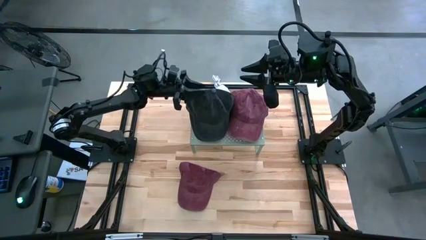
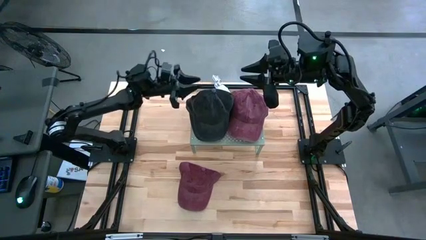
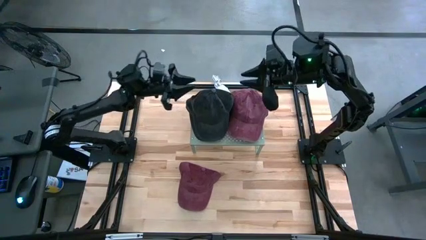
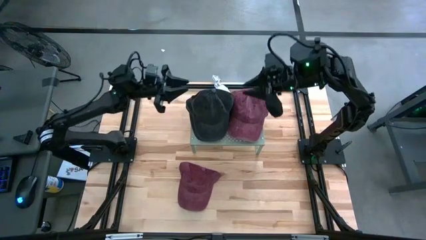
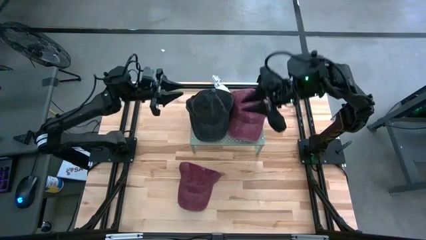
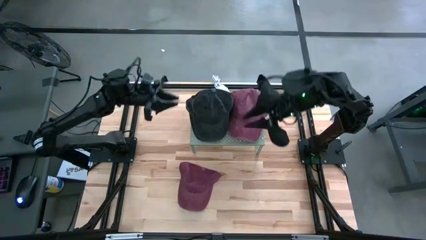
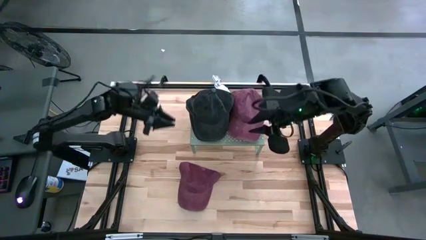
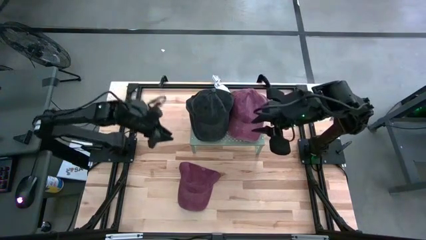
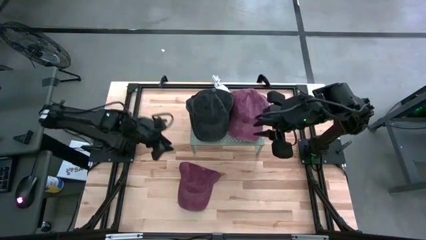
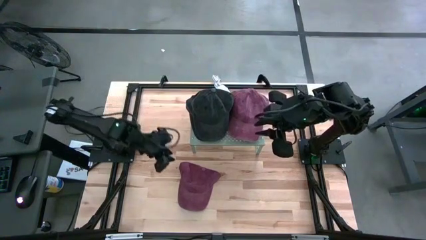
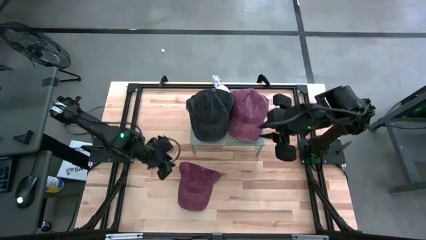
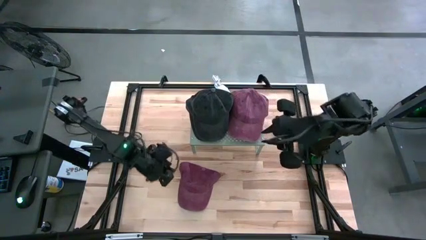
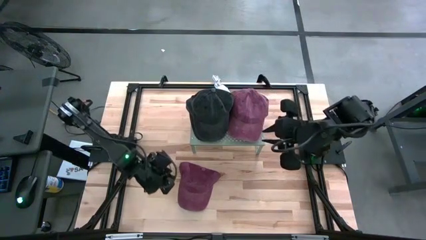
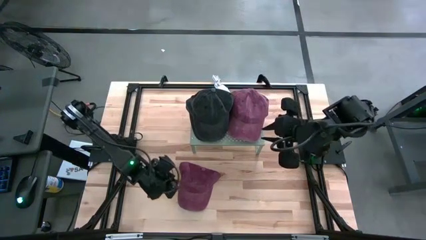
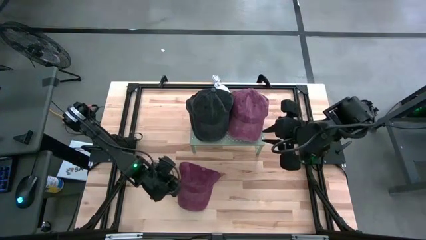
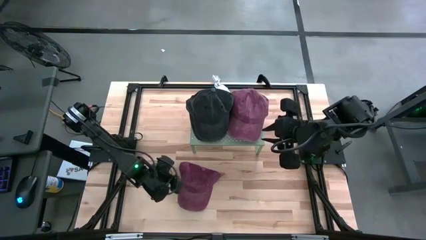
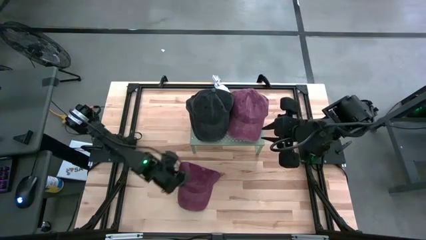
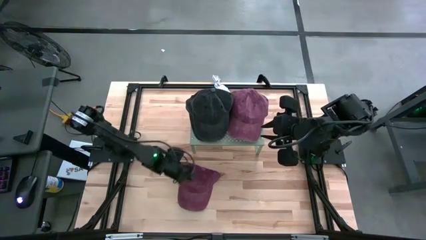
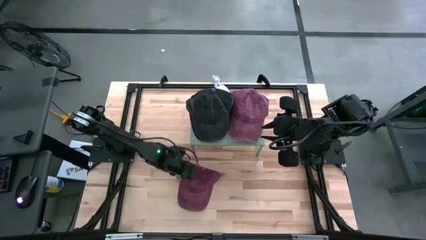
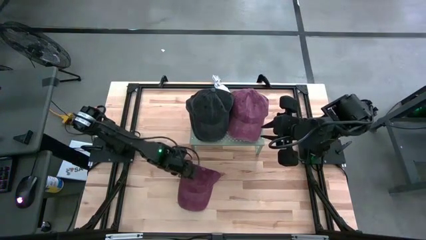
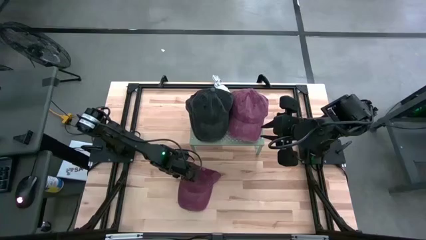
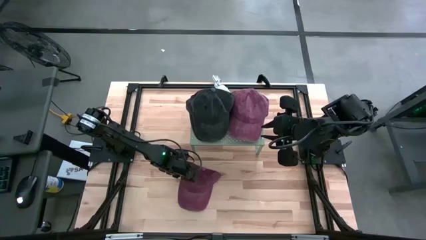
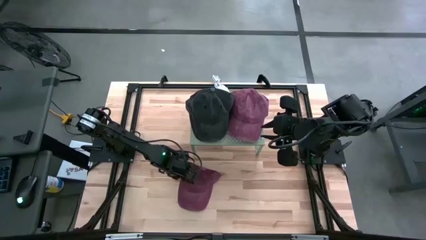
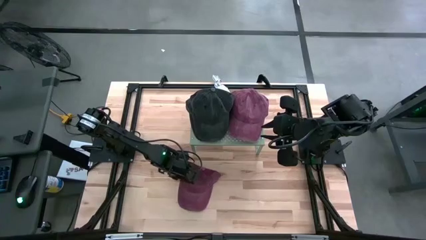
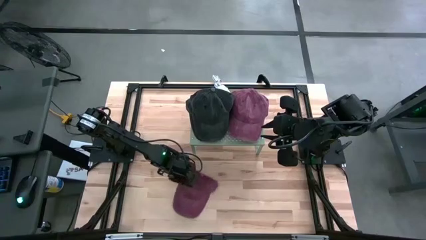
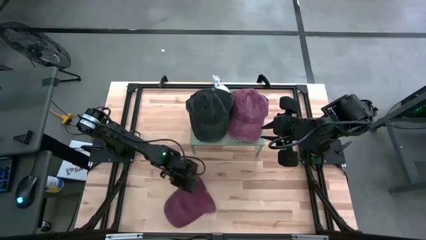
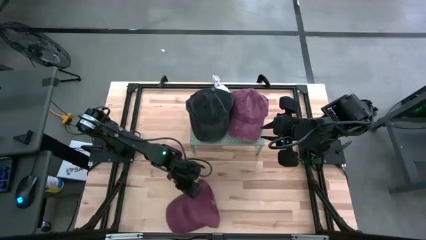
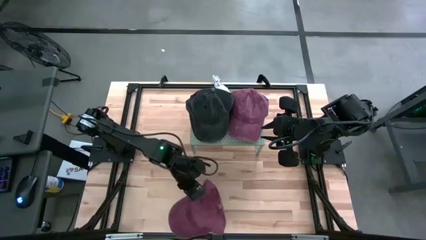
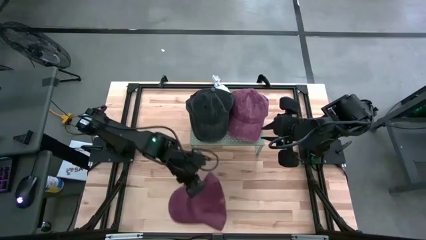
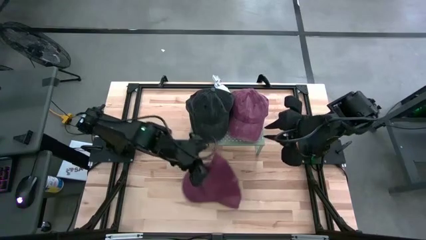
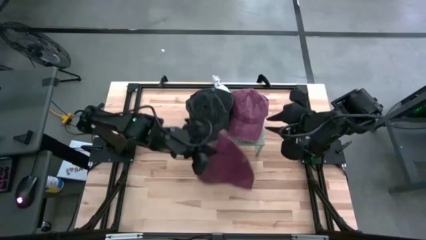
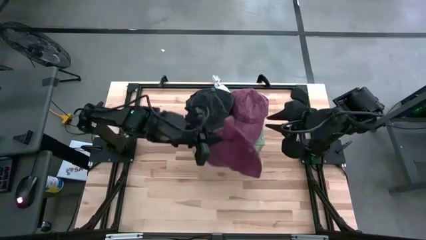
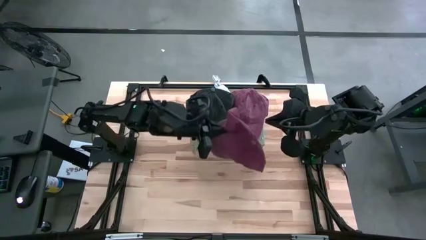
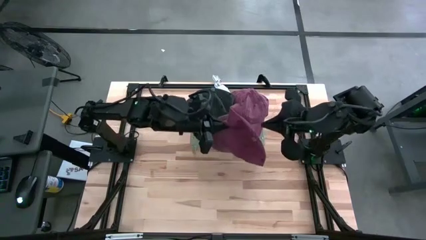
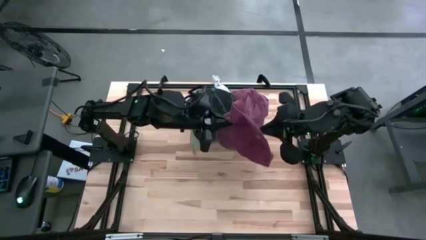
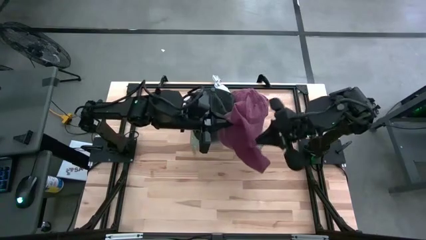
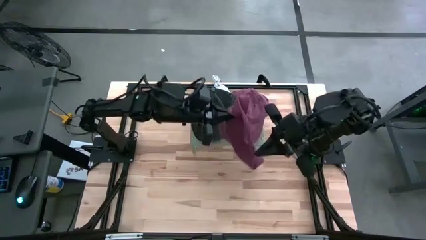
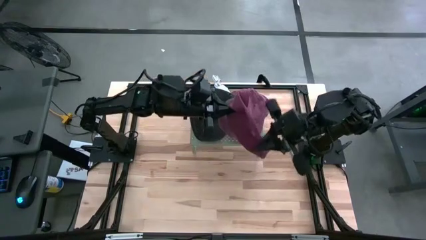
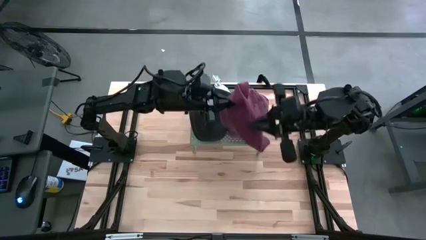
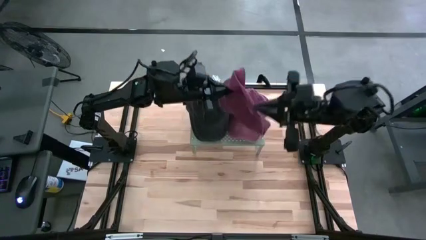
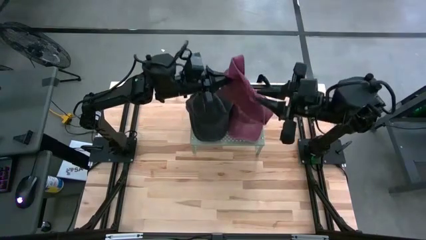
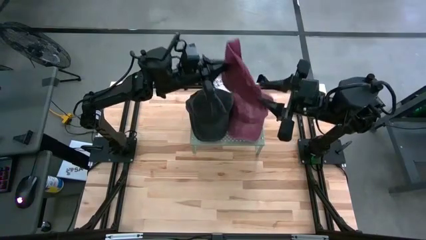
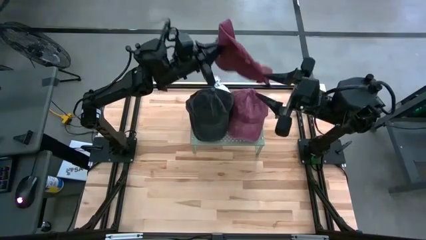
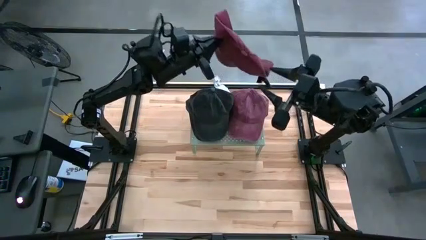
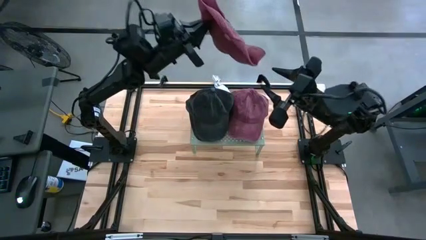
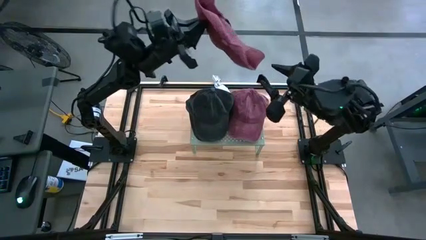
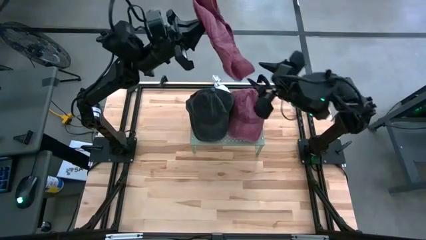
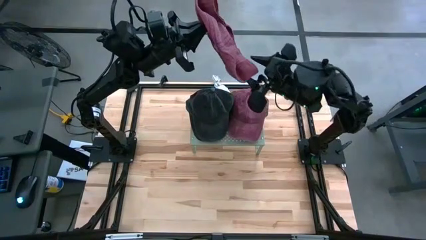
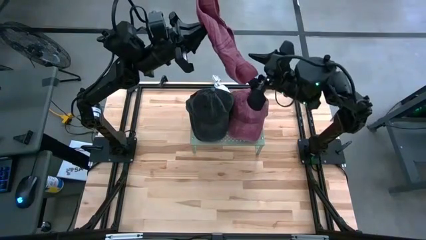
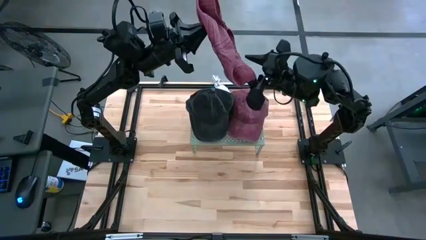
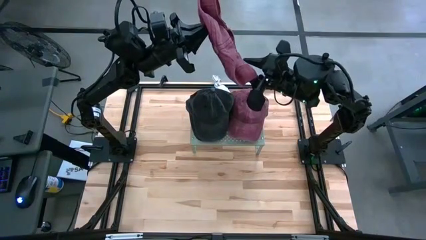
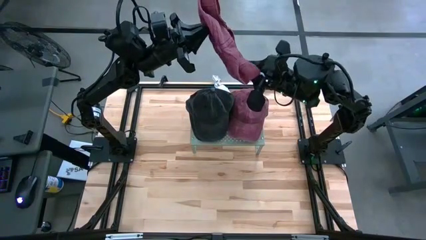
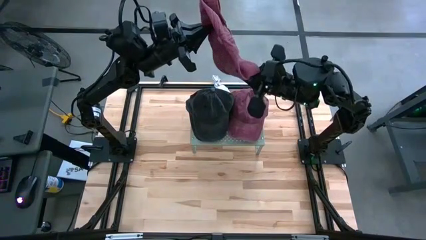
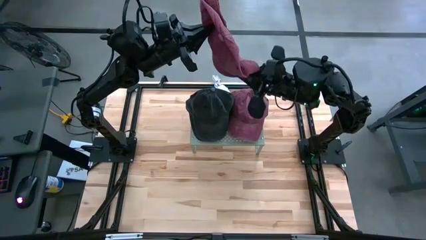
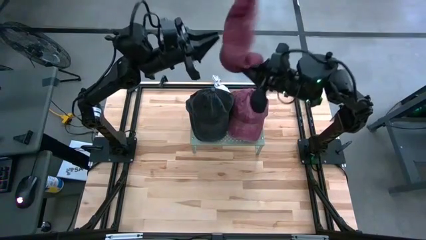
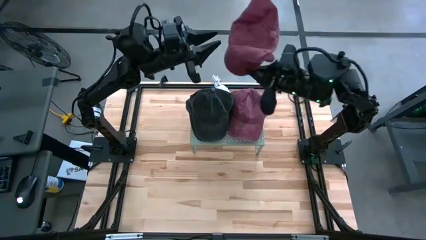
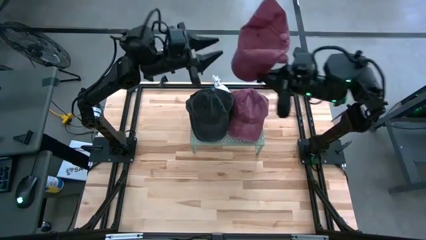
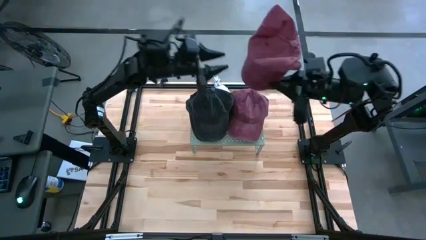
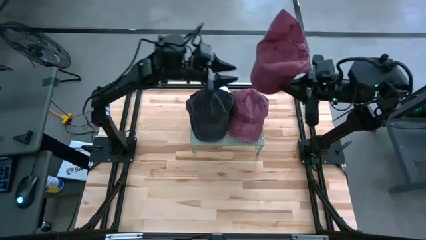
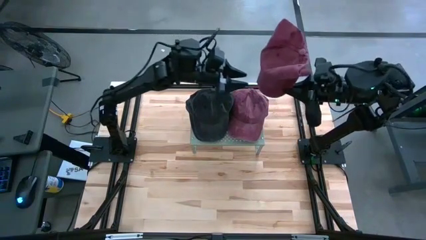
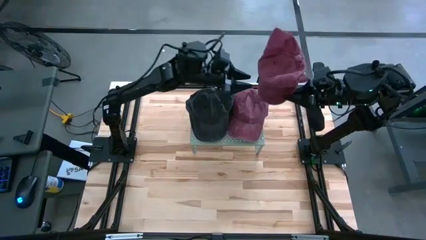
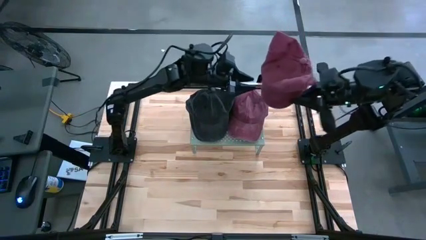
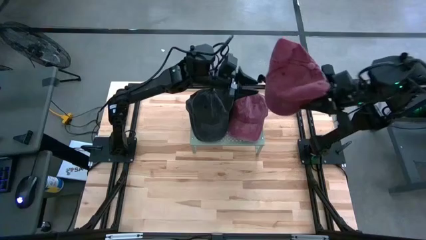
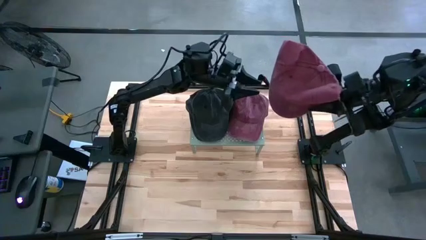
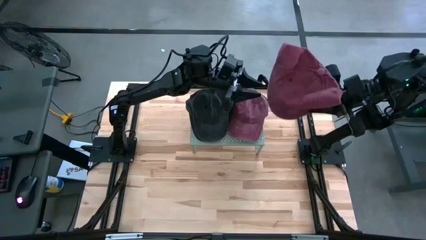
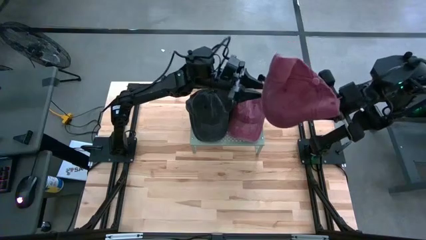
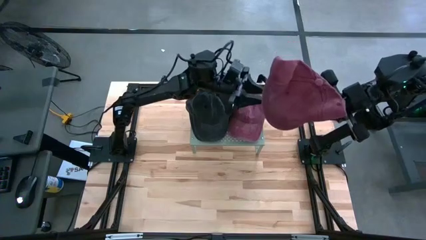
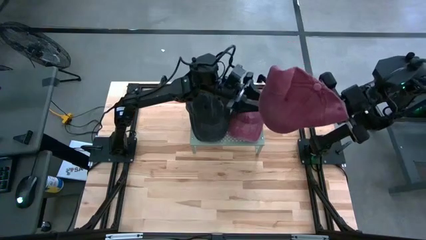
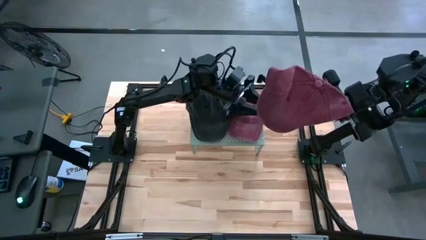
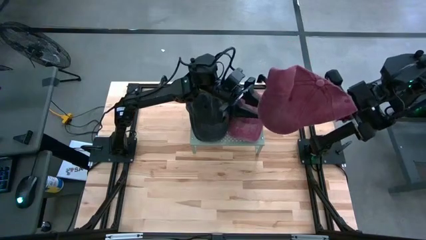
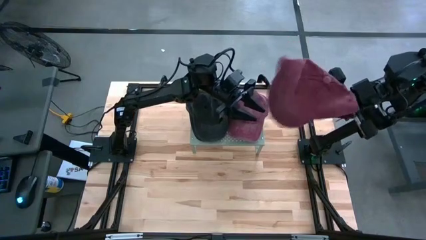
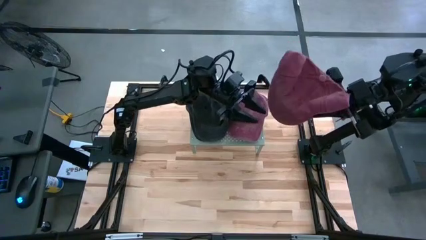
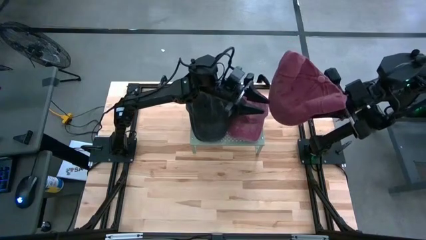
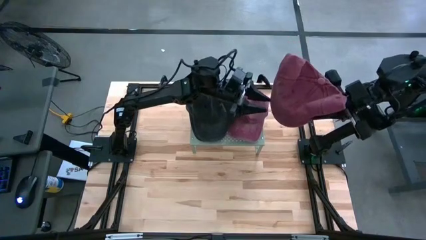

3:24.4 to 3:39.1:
Task: Pick & Place hat
Stack the red cap on top of the red cap on the shelf

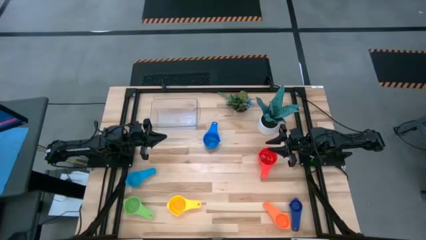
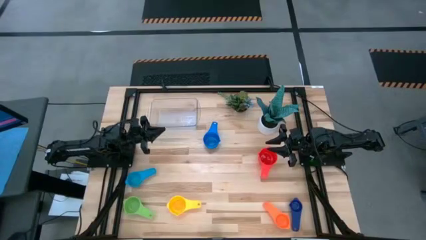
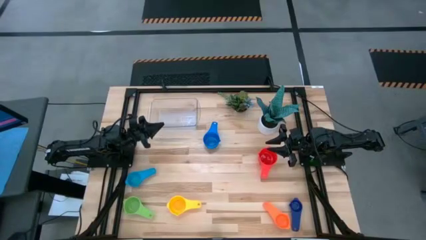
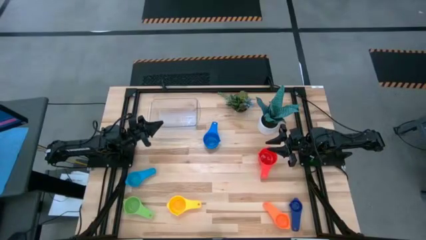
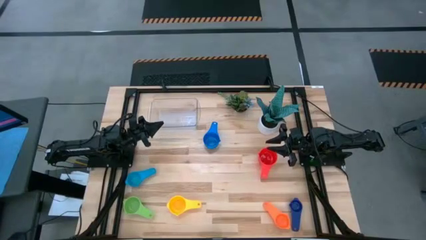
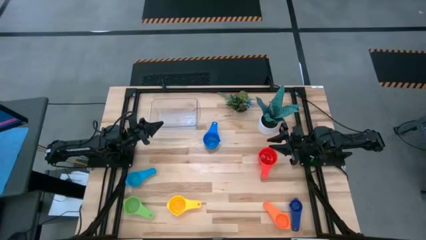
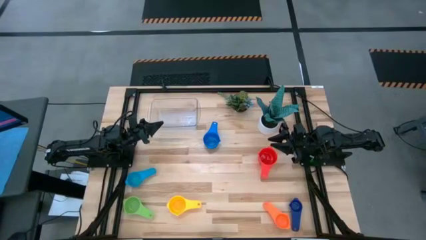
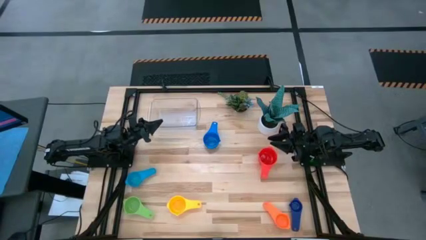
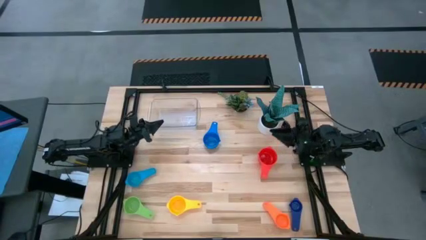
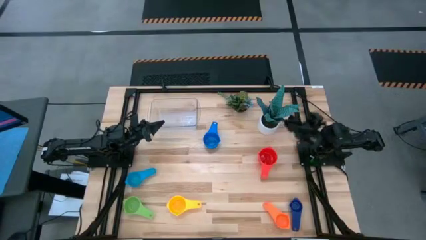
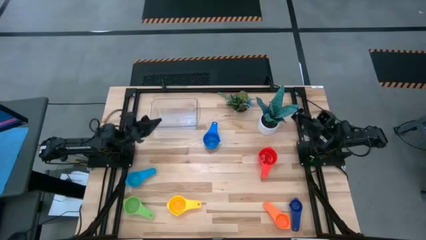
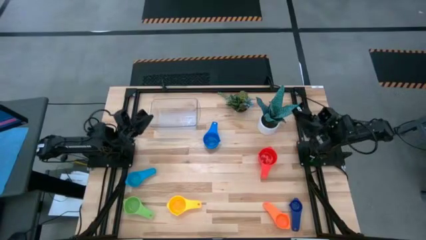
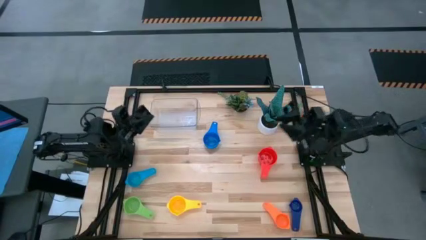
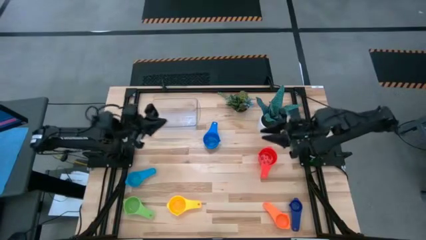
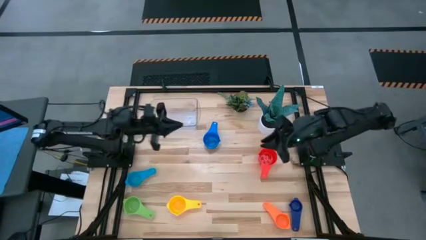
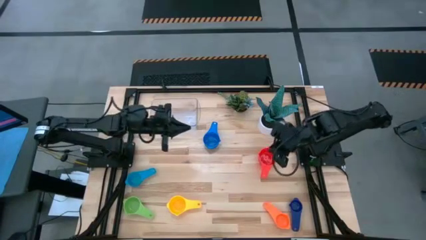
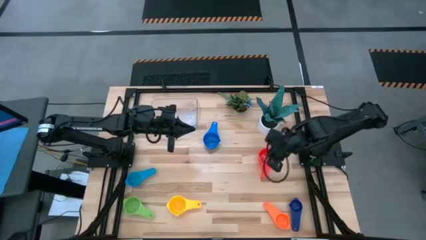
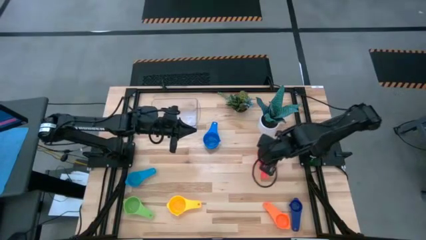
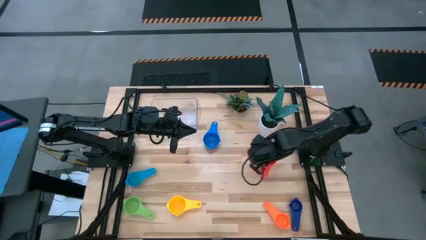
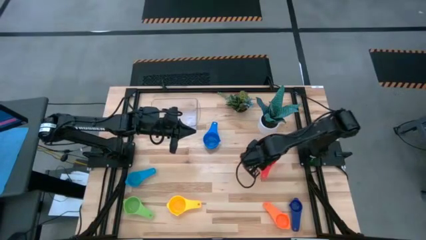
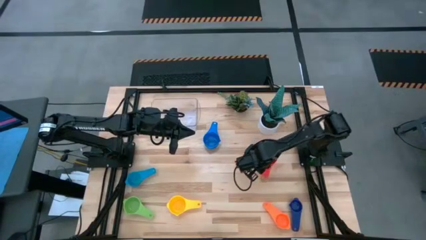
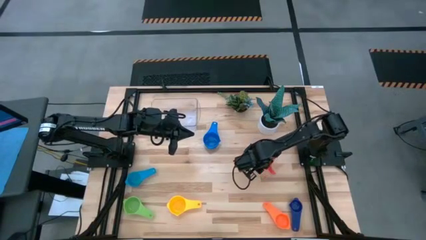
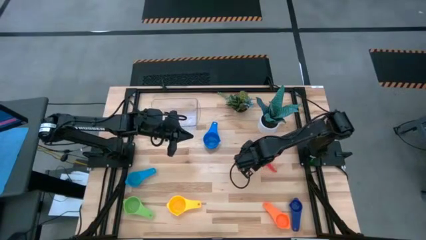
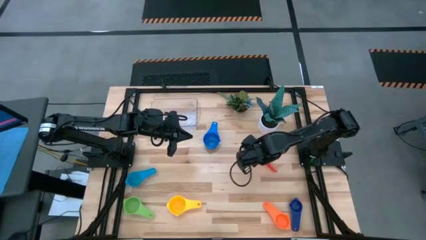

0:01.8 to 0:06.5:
Task: Nest measuring cups in basket
Put the red measuring cup into the transparent bin
